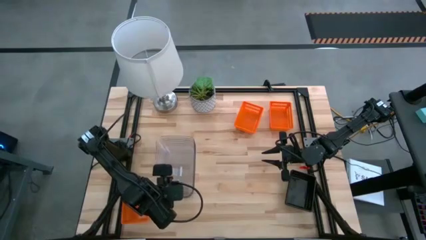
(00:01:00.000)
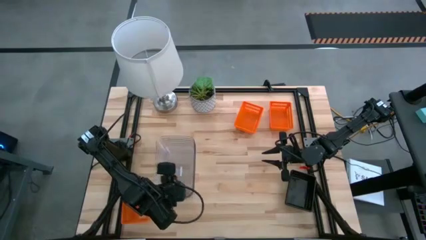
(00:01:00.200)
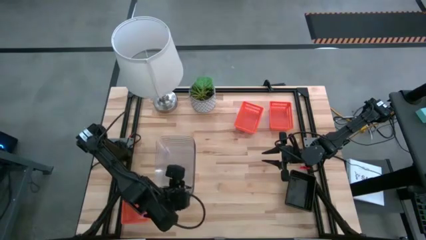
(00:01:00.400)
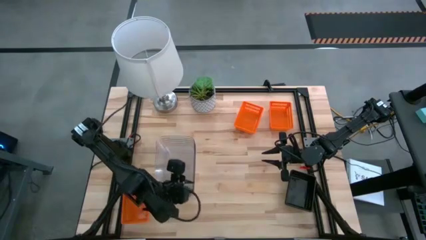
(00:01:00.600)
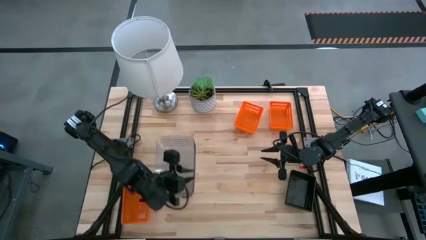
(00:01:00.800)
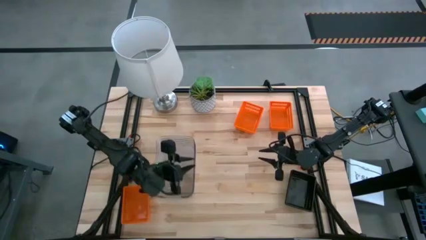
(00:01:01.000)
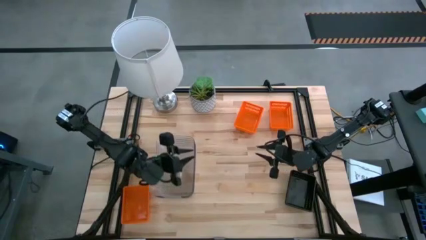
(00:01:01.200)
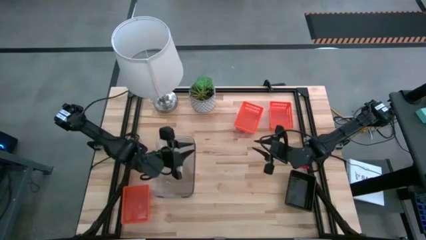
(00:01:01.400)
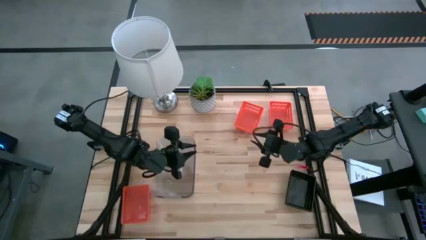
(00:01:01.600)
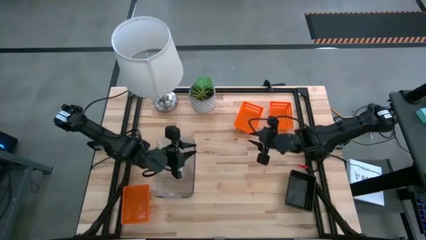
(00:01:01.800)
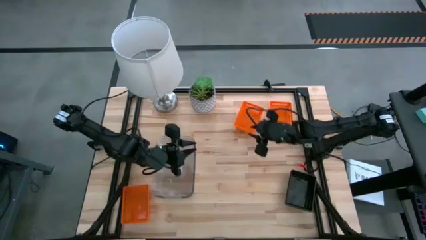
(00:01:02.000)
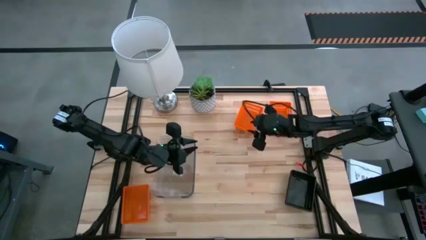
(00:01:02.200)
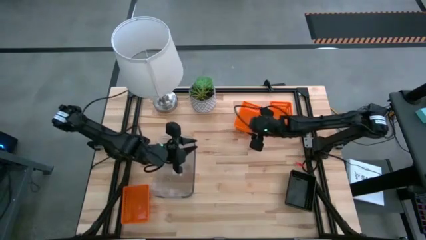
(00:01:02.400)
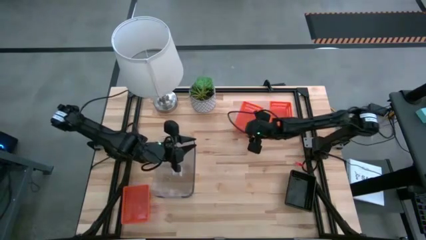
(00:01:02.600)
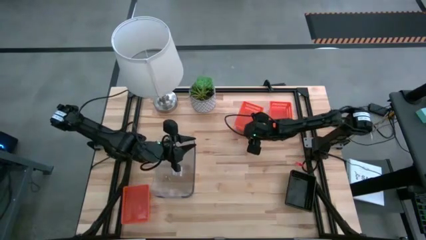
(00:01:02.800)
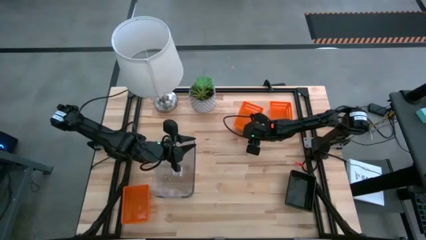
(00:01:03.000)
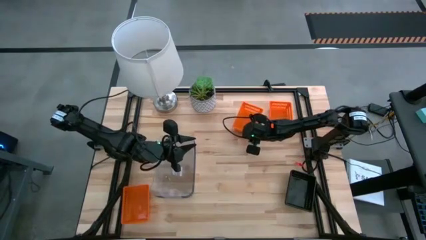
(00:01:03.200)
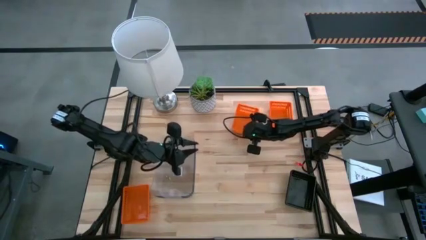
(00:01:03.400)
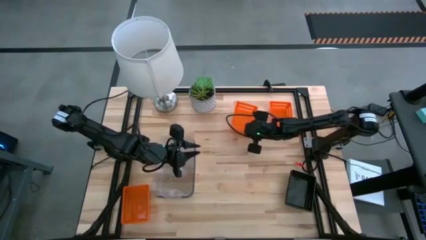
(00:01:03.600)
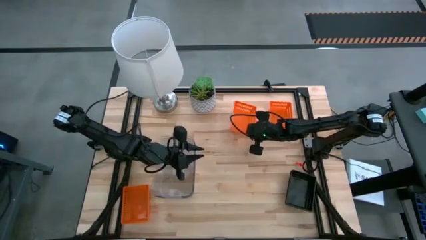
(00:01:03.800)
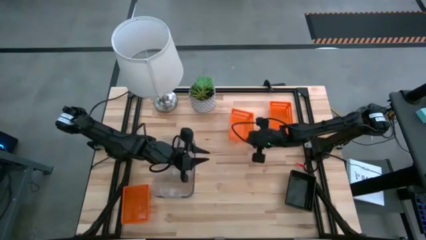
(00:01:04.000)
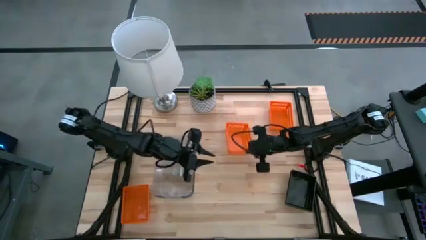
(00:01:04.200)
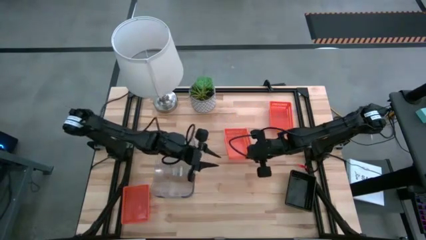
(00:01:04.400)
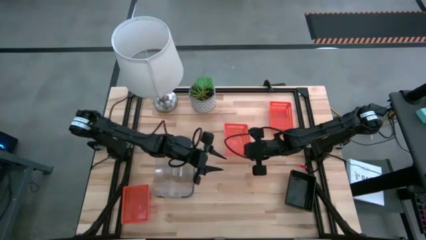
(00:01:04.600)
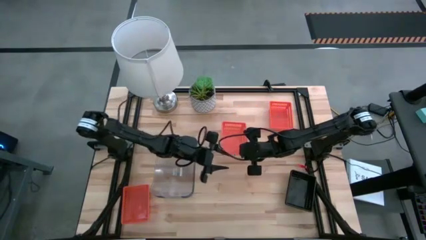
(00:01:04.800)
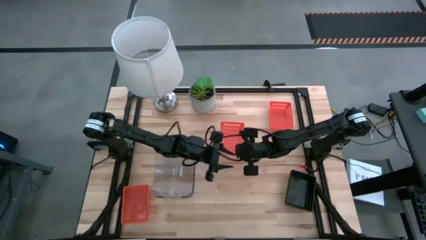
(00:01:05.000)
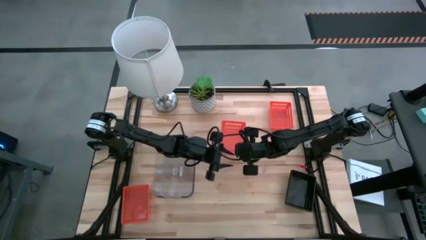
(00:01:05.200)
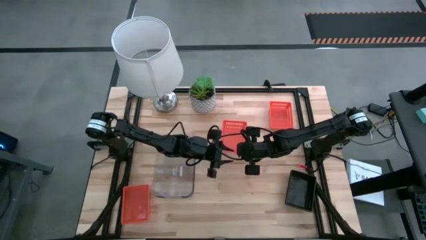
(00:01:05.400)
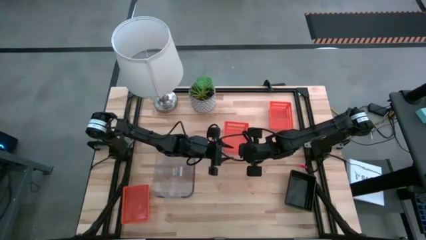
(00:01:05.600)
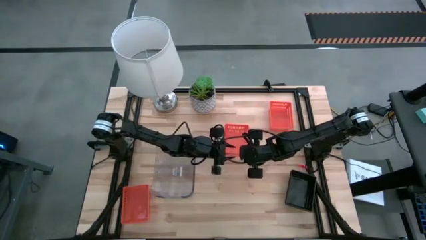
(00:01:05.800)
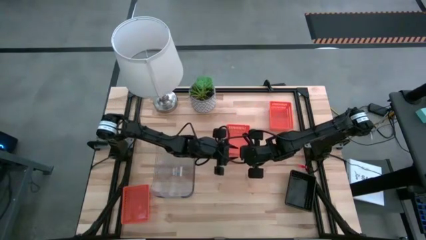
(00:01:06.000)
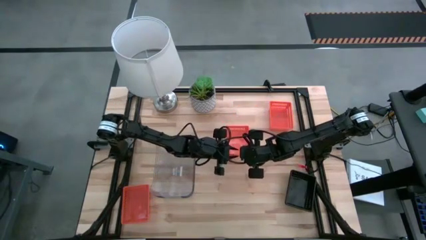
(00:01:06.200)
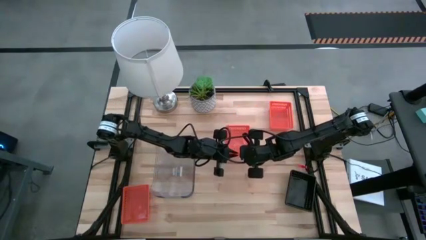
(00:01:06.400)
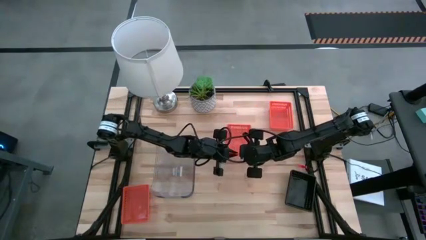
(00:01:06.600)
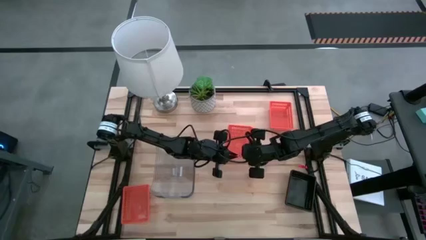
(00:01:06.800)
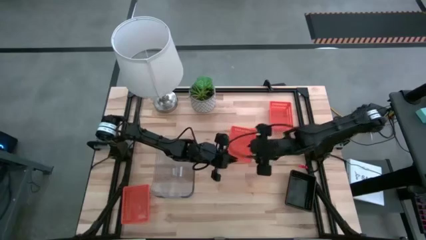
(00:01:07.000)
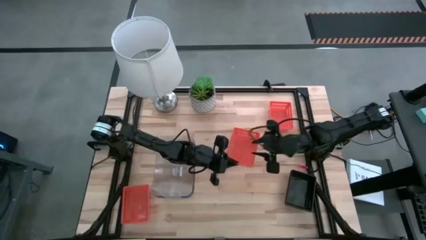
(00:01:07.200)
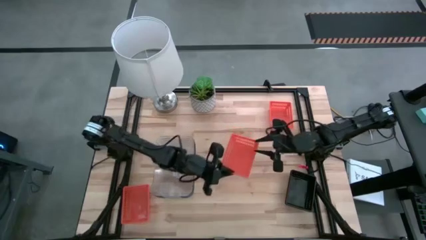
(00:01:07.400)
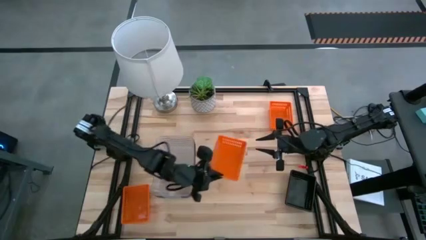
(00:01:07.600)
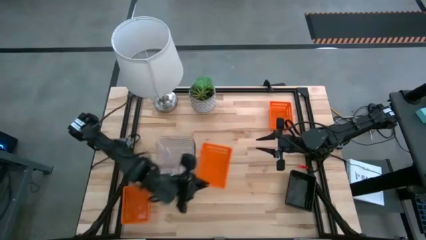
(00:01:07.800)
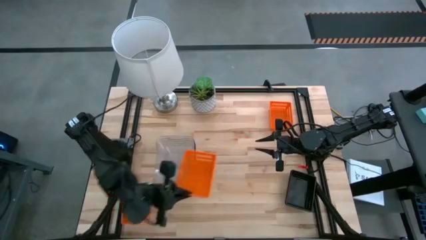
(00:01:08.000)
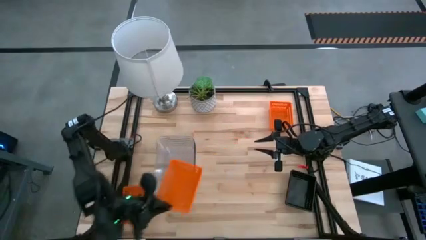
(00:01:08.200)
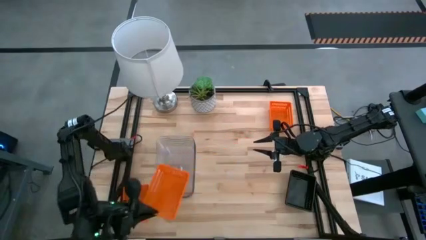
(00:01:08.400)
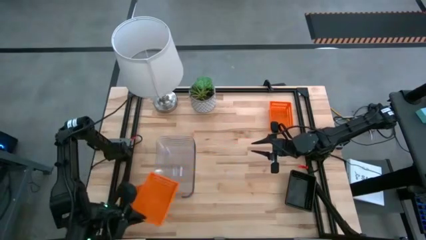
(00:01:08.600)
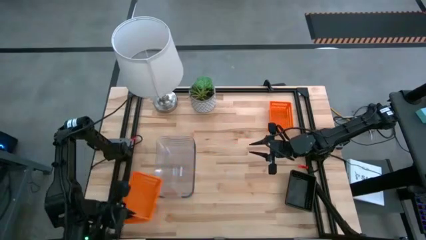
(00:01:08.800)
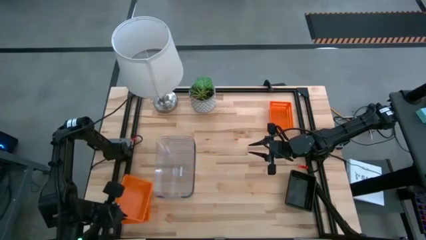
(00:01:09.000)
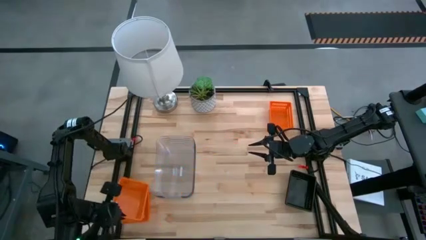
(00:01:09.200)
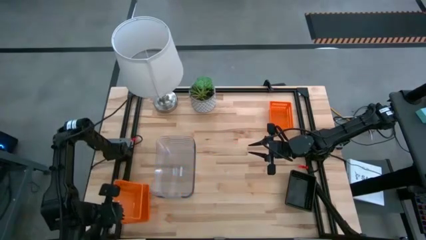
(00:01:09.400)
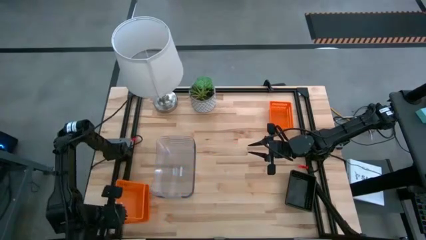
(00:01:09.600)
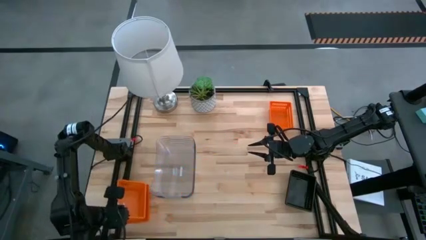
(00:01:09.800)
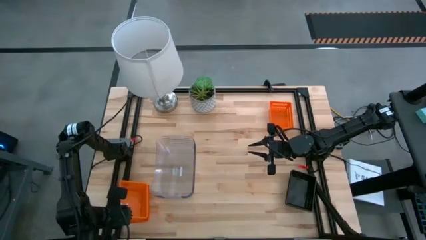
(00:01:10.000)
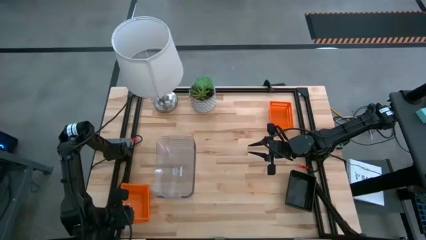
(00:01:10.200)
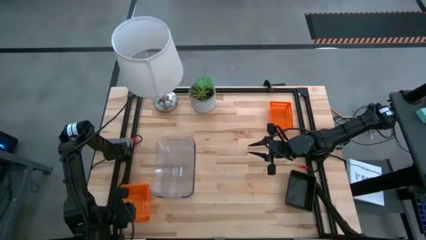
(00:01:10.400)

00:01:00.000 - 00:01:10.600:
Stack the center orange bin on the left orange bin
